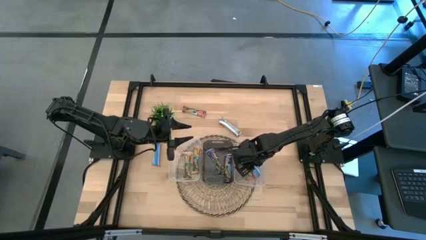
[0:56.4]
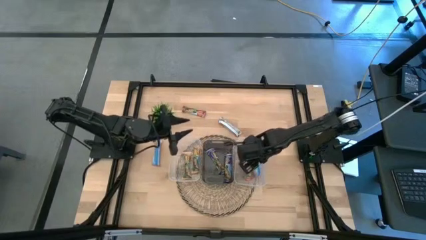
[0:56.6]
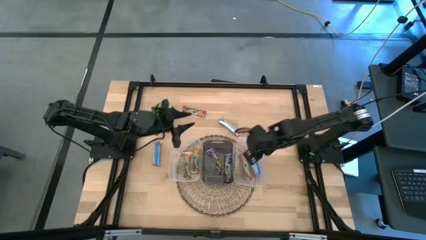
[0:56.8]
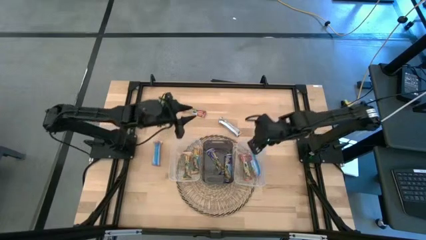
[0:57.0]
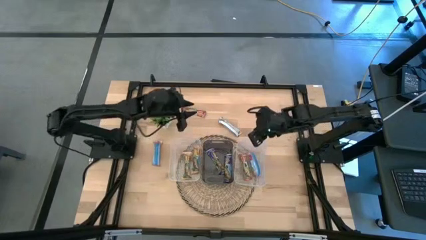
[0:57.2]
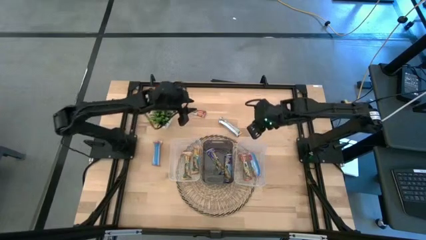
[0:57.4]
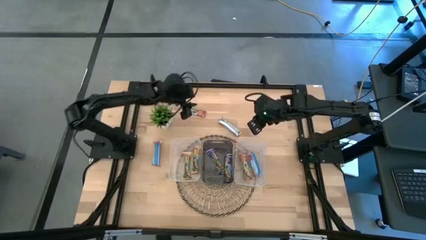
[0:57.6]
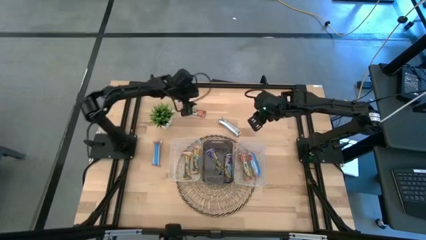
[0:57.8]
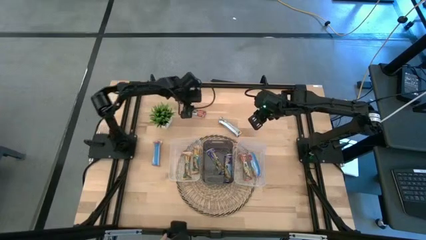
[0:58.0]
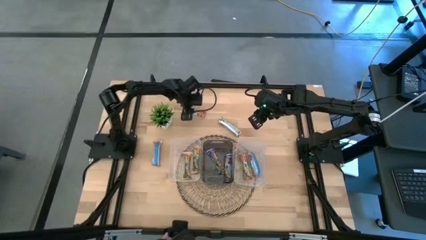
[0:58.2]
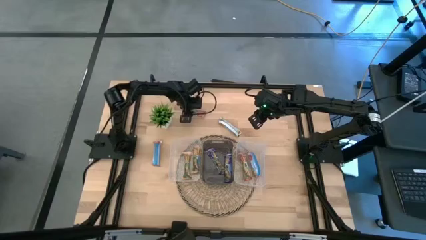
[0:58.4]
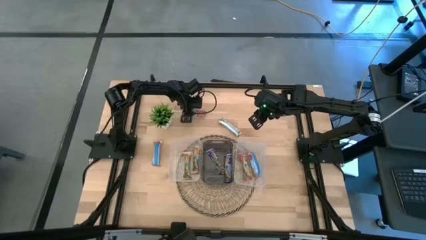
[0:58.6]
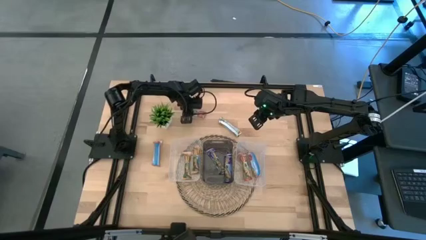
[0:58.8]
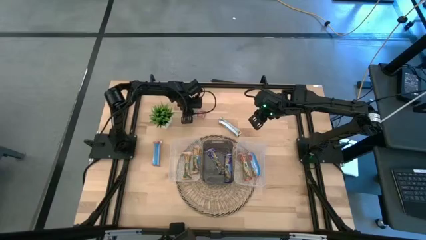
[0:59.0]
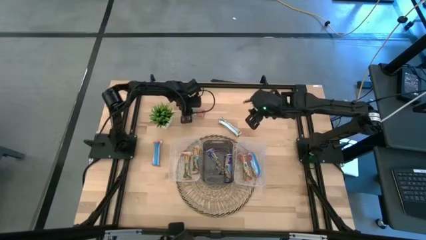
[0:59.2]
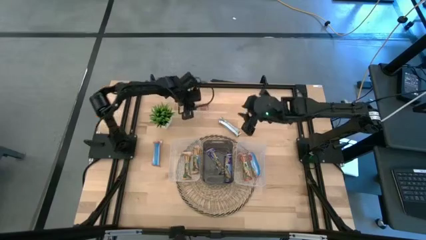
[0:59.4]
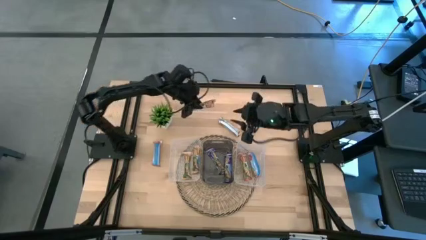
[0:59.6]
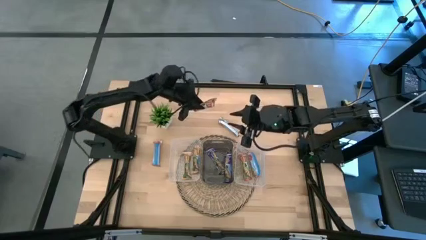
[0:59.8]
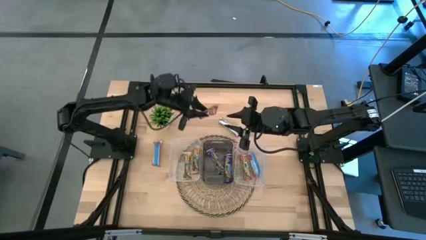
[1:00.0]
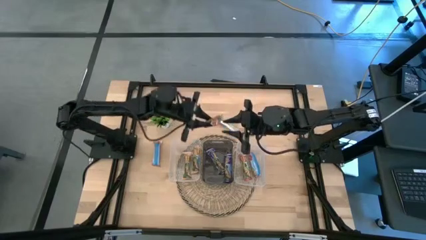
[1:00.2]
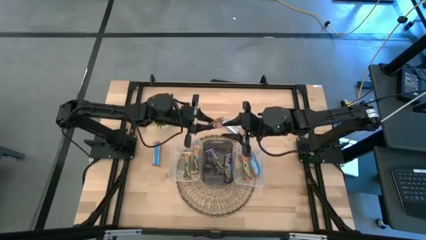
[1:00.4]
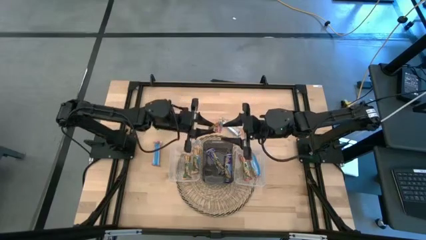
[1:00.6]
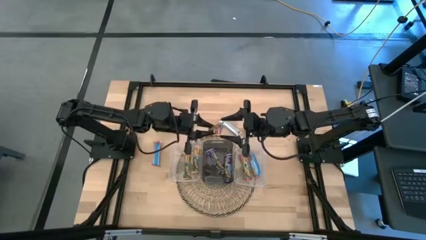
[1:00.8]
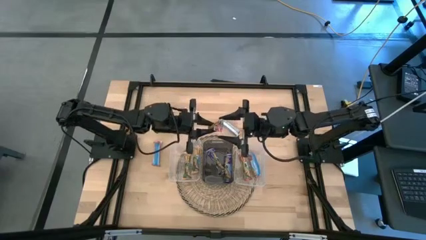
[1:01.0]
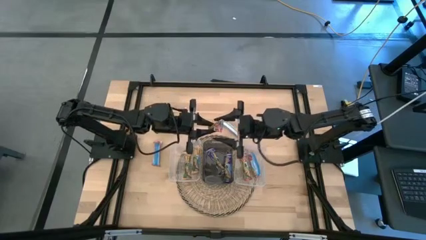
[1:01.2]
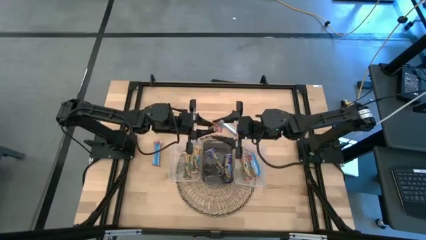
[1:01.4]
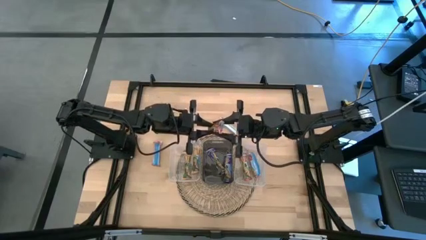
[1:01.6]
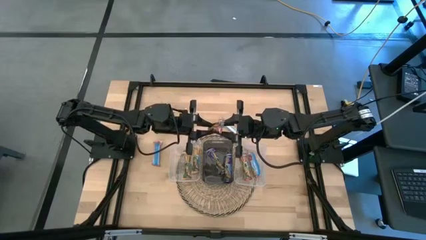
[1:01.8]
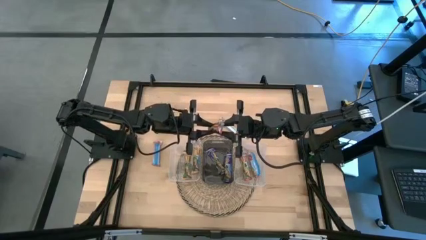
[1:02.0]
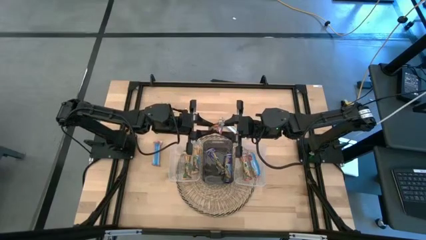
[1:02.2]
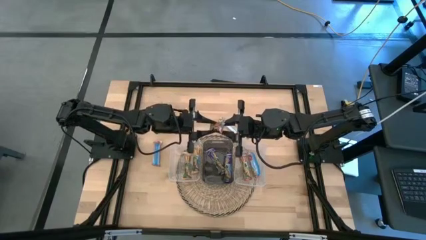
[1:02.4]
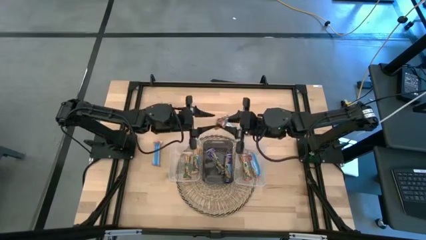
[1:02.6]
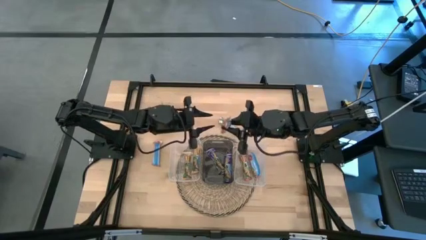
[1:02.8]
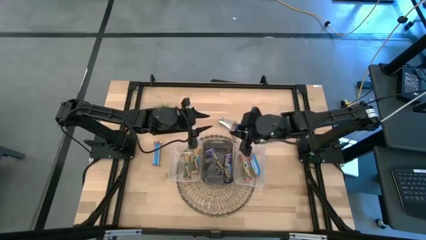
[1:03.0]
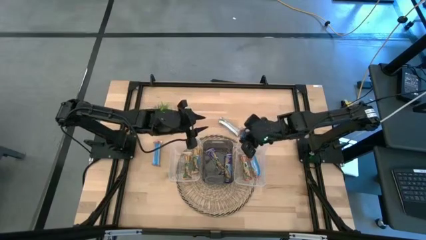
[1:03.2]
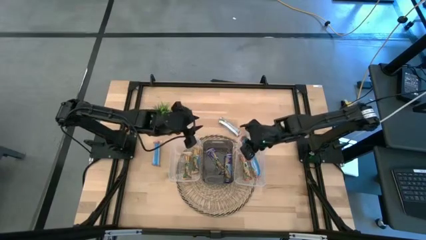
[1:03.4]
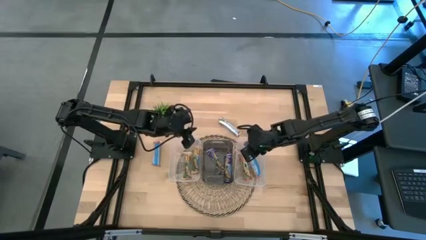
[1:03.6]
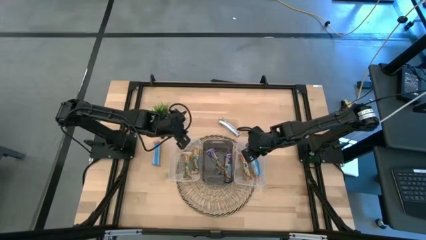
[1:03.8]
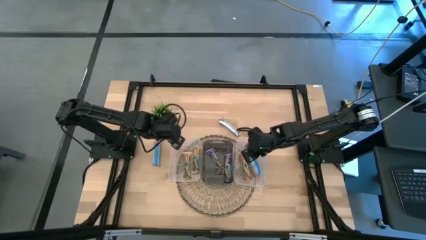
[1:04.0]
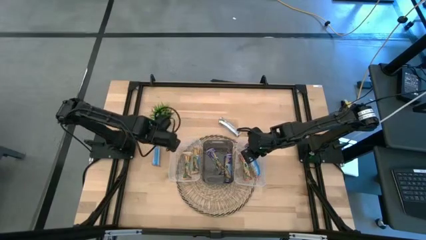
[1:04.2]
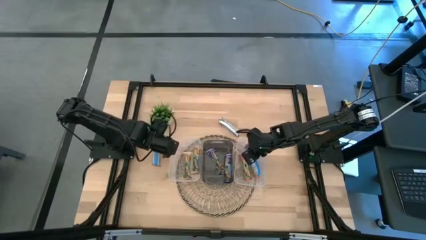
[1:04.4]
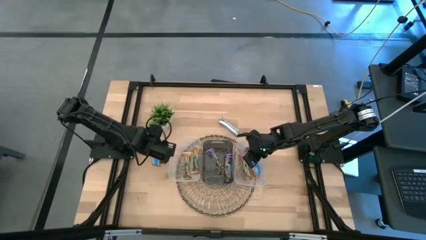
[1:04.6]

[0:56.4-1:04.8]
Task: Pick and place Granola Bars by type
Put the red granola bar into the right transparent bin

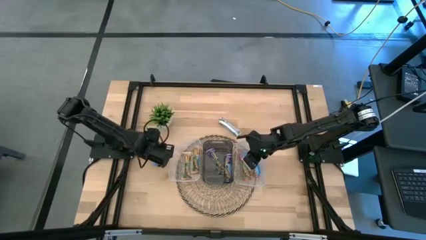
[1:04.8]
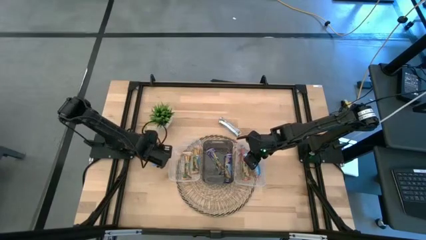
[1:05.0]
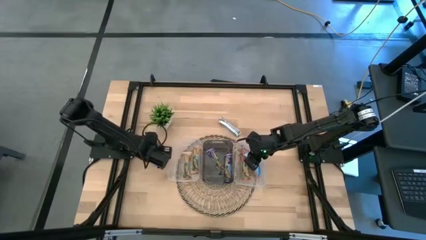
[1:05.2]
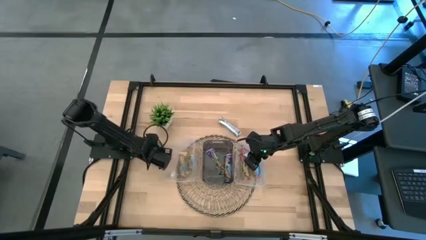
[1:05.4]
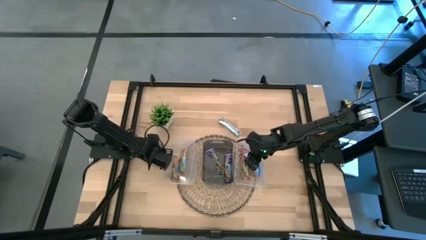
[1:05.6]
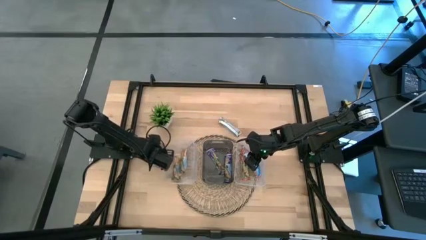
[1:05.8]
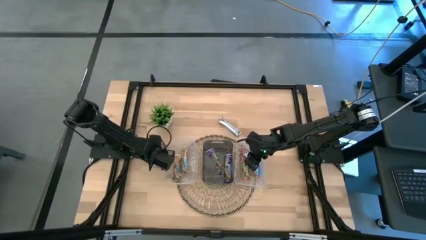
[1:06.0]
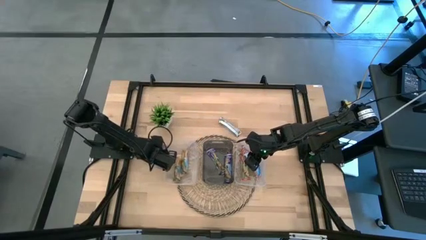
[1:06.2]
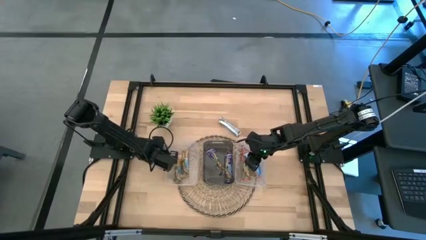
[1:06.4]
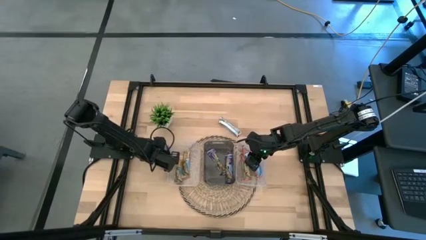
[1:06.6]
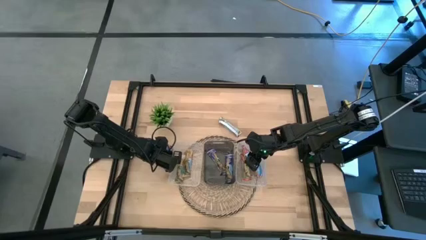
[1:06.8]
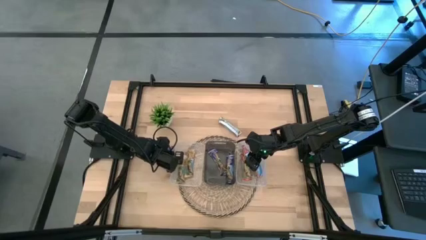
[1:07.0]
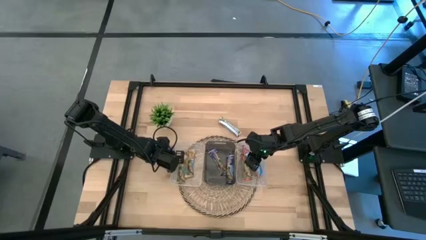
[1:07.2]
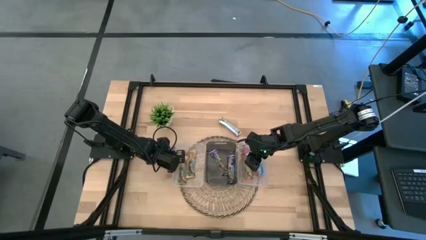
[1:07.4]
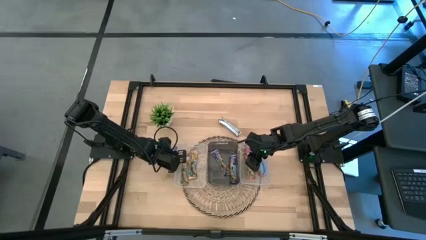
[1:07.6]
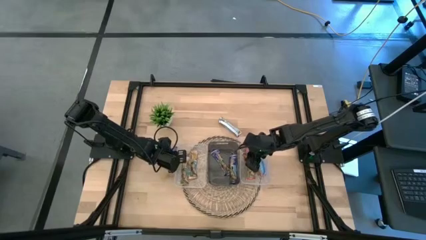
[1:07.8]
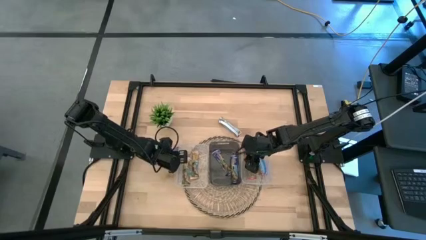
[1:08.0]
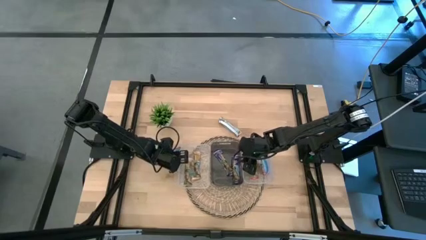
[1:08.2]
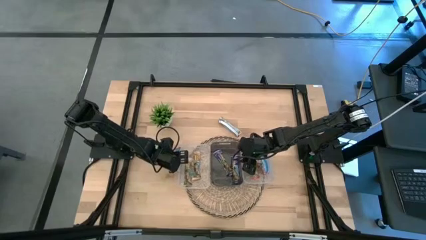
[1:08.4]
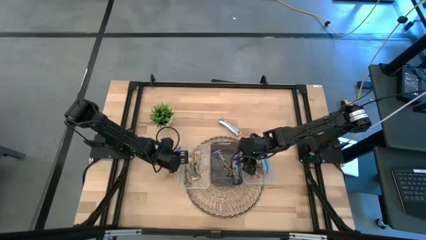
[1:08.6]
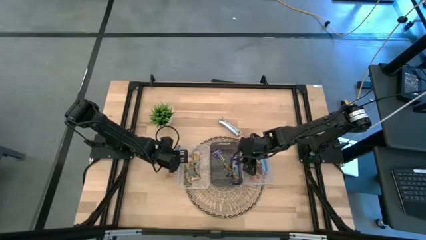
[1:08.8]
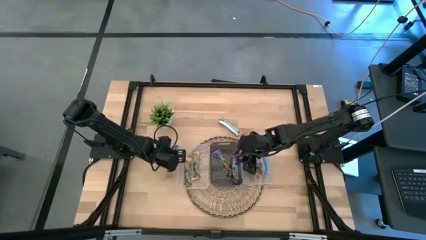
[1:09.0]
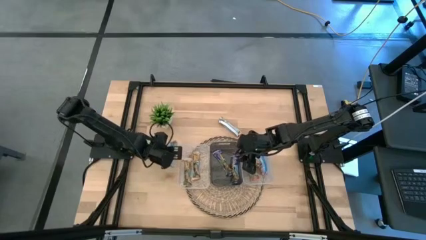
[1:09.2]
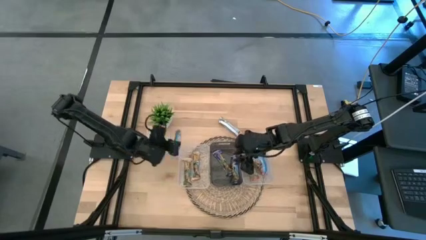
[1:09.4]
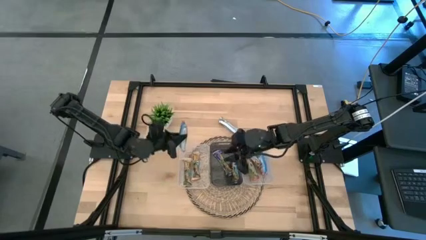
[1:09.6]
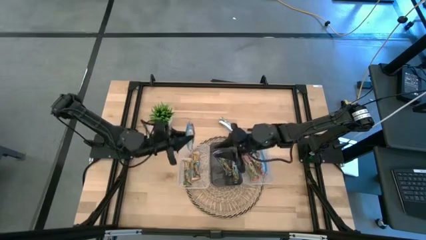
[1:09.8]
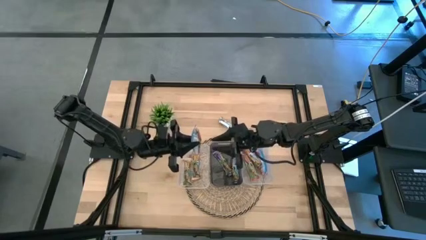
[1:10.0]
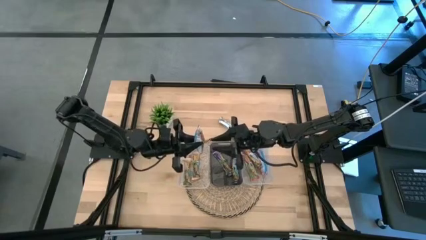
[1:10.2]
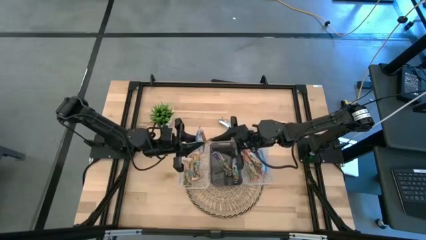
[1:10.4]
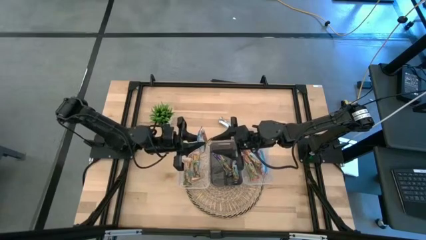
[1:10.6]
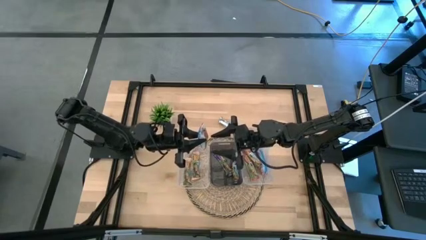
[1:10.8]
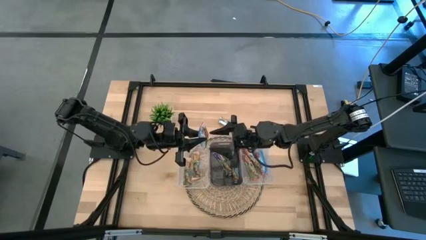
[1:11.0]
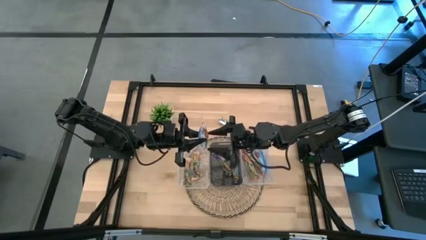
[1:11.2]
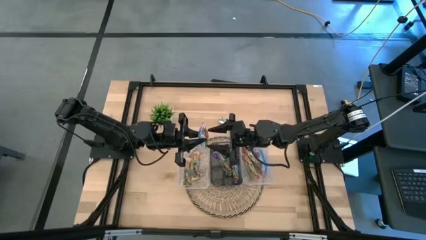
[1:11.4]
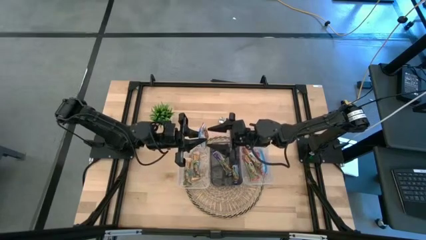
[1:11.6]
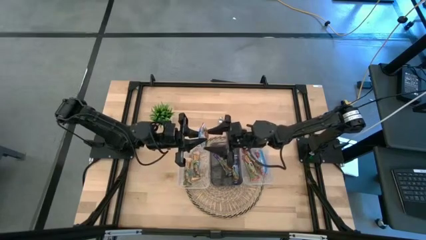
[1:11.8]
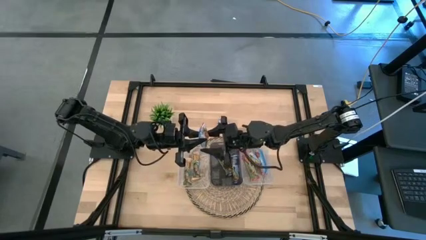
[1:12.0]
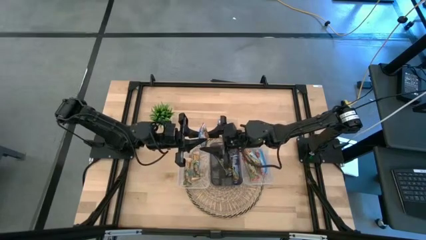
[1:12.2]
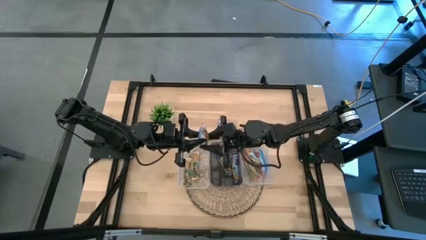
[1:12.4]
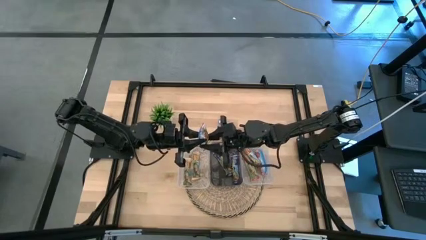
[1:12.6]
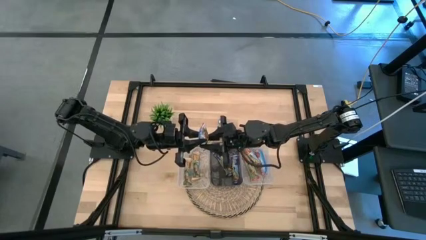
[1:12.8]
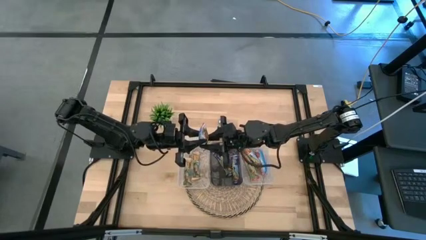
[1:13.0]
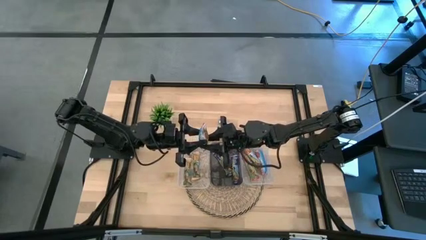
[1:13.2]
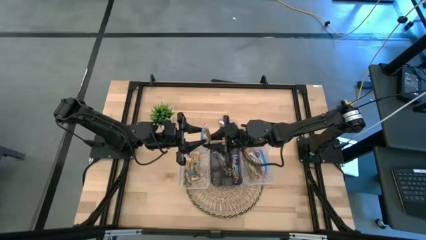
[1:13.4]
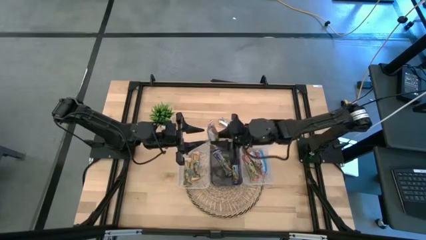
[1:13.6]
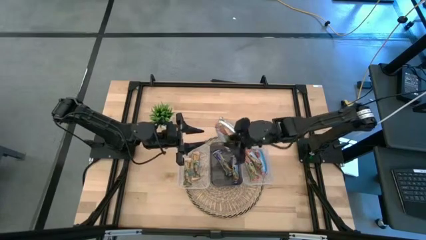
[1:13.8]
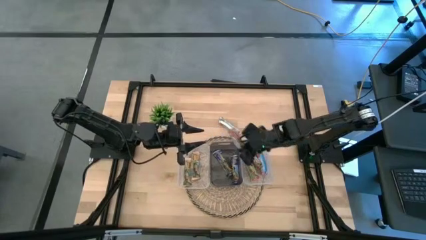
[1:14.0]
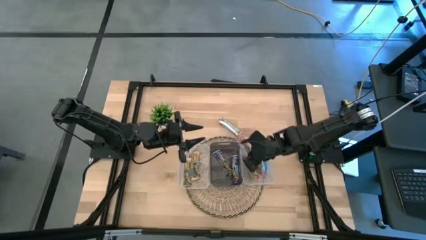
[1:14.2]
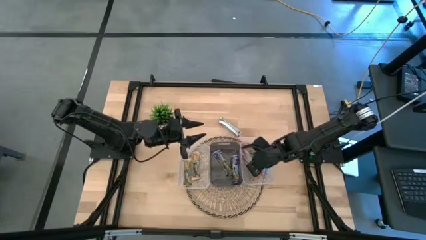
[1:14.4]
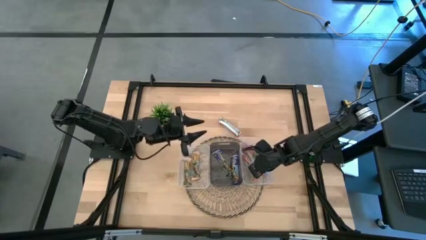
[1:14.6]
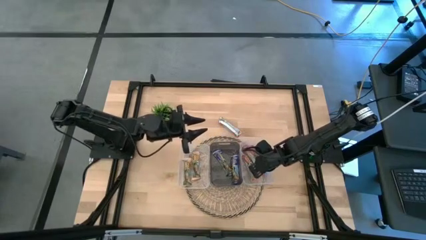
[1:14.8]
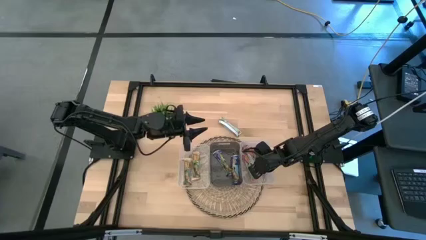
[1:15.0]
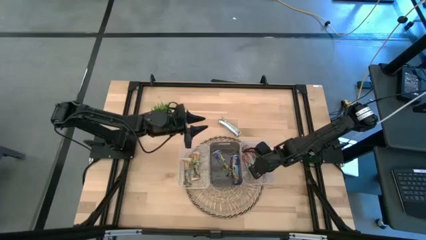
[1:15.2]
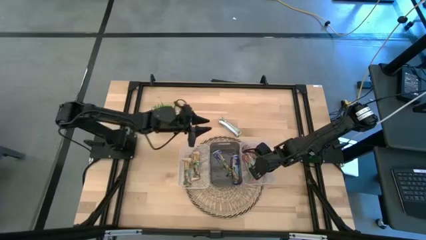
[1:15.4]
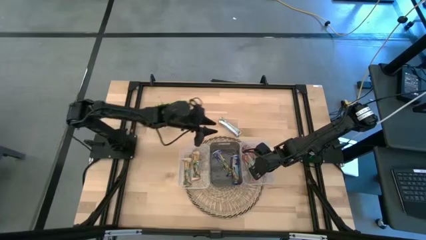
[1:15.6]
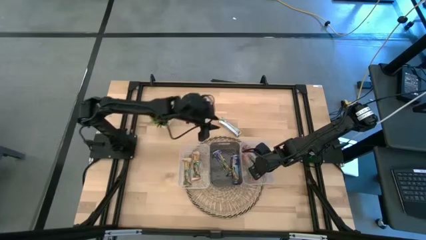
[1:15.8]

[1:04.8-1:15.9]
Put the red granola bar into the right transparent bin
